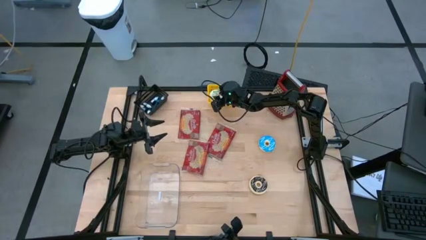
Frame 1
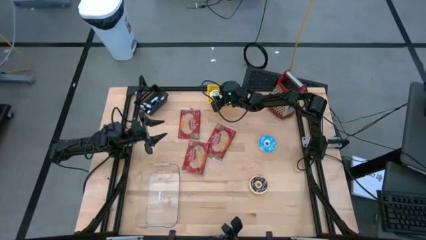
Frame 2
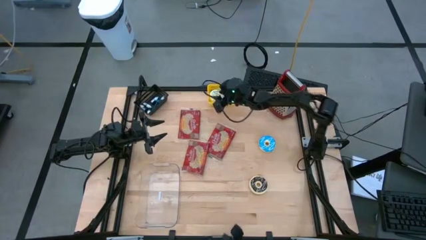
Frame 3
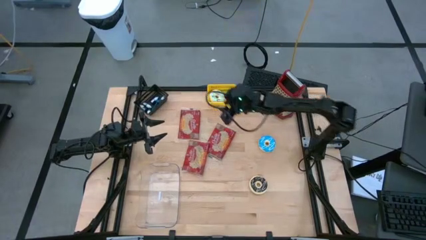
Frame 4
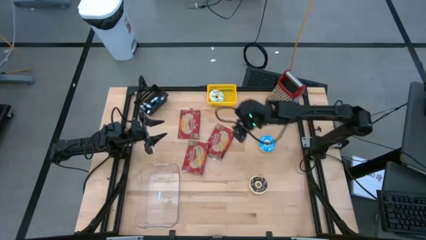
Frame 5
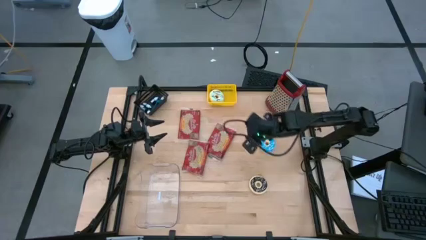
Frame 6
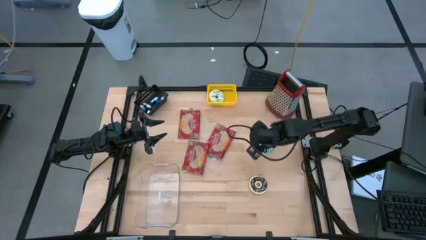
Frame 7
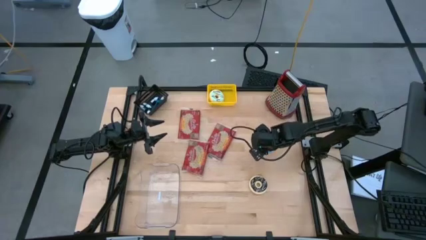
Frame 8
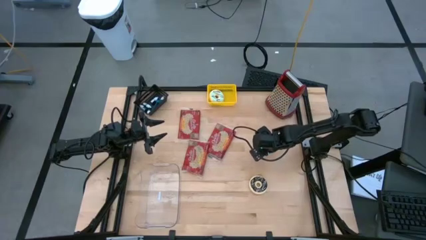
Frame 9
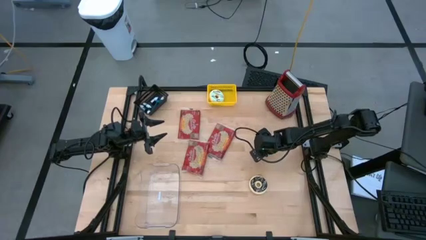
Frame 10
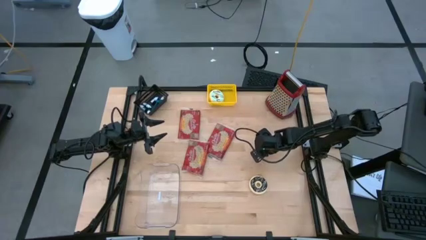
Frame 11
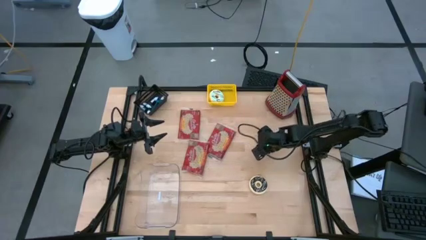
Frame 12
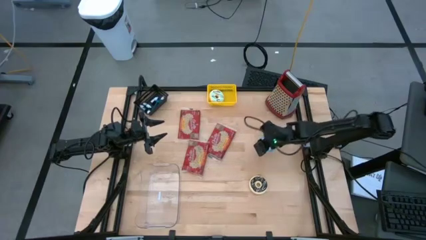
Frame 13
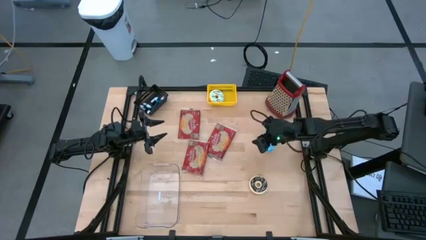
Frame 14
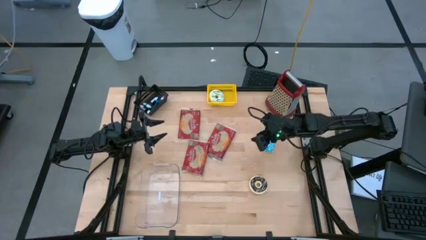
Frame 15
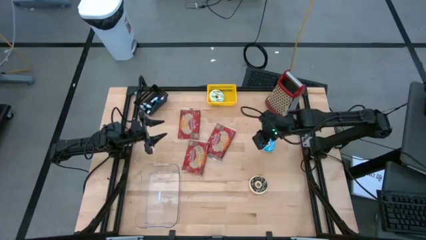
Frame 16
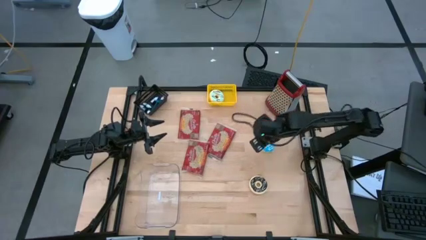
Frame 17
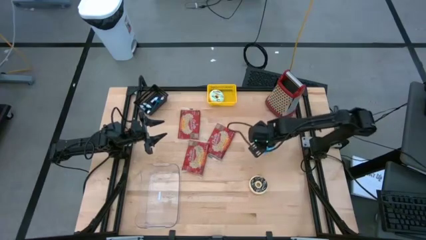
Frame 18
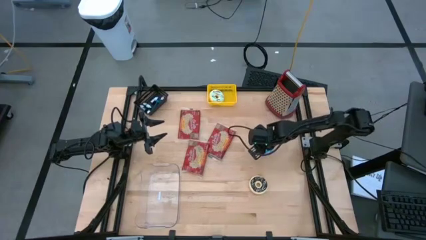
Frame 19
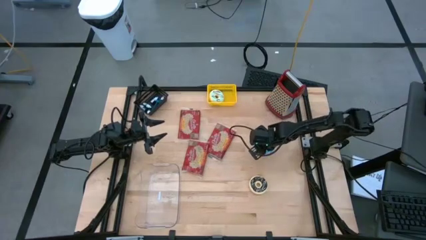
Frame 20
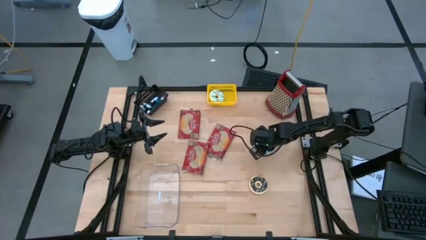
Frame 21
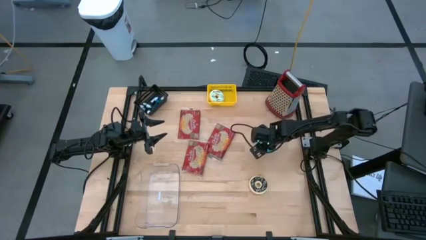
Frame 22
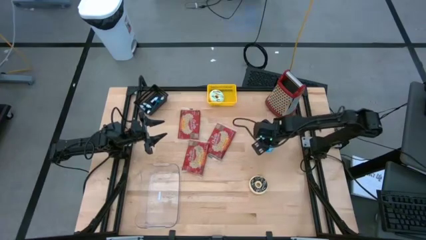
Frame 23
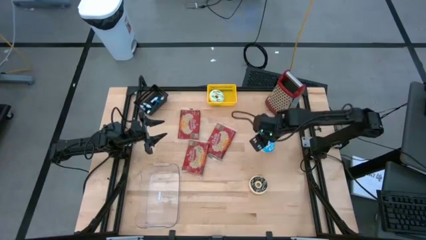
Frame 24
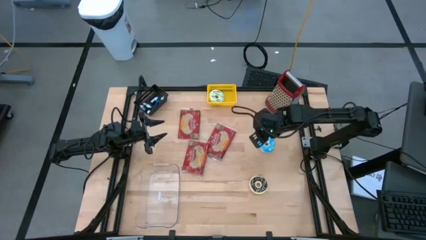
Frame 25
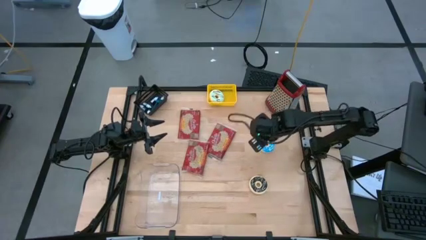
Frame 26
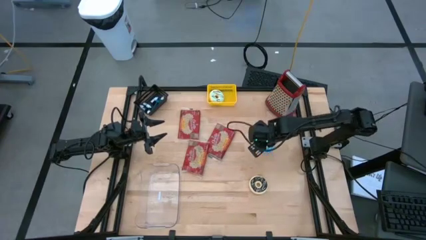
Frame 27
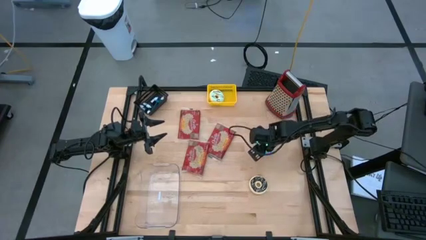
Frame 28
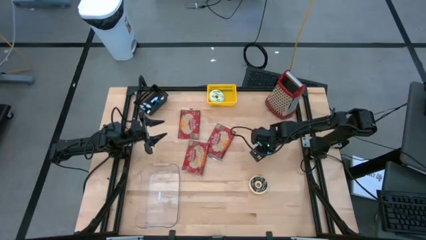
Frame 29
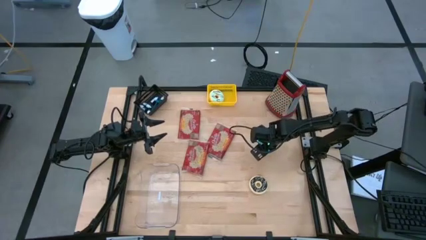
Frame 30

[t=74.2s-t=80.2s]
Put the blue donut into the yellow bin

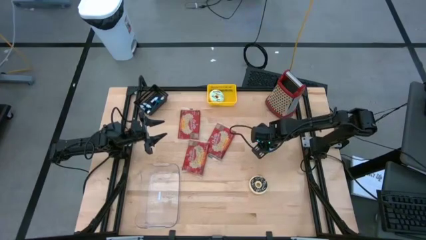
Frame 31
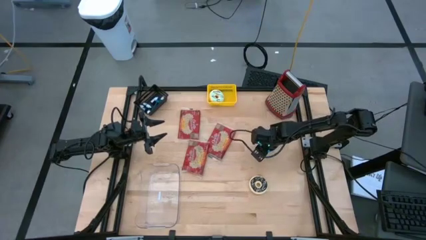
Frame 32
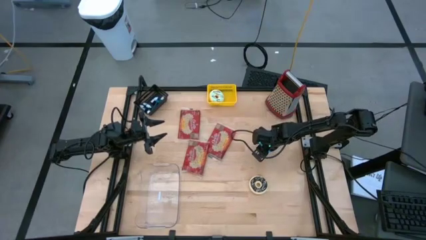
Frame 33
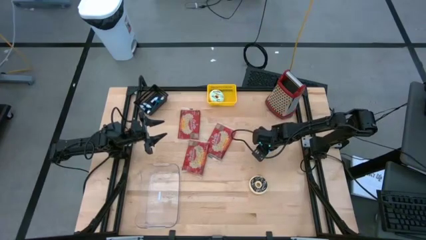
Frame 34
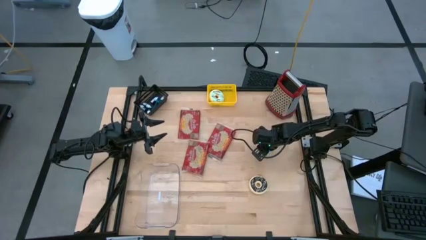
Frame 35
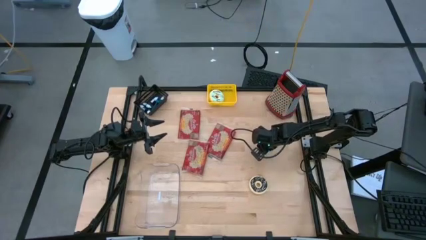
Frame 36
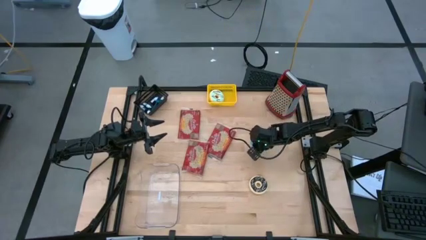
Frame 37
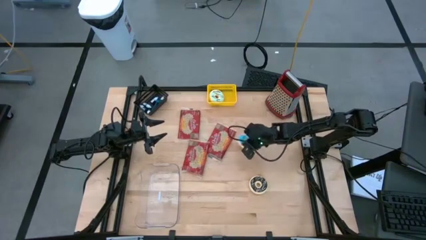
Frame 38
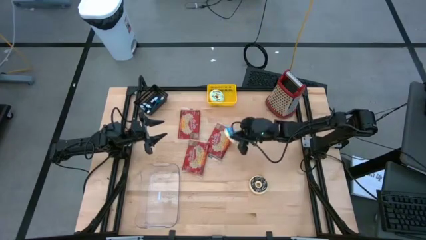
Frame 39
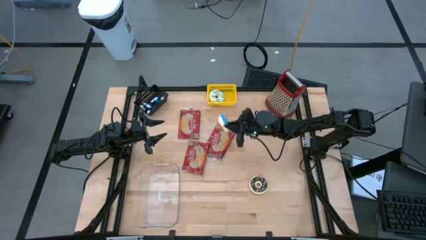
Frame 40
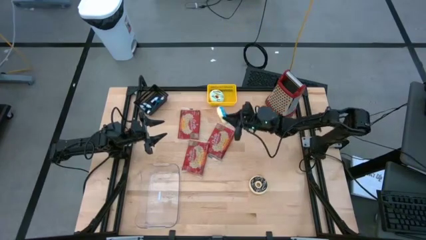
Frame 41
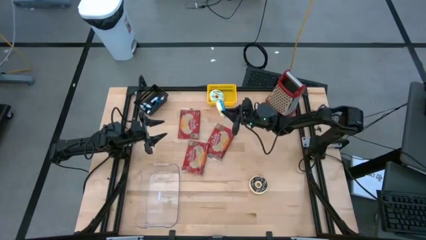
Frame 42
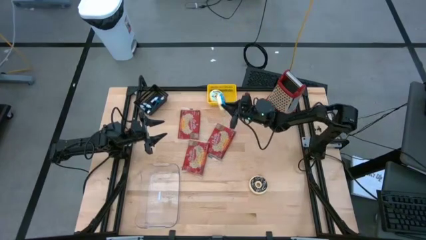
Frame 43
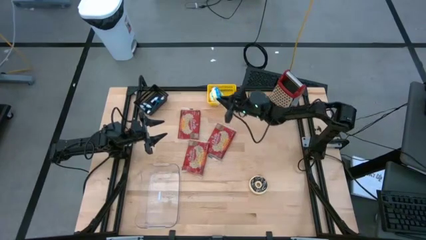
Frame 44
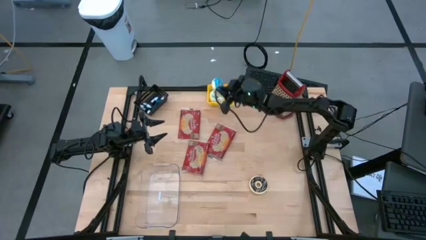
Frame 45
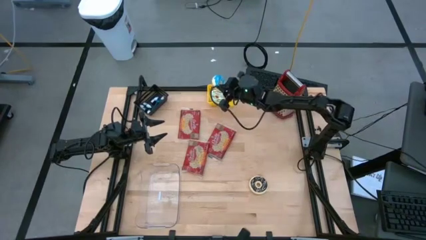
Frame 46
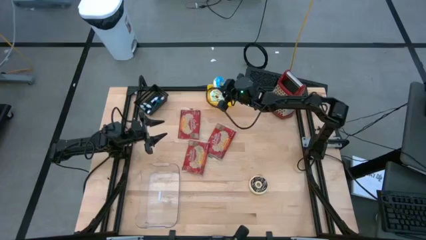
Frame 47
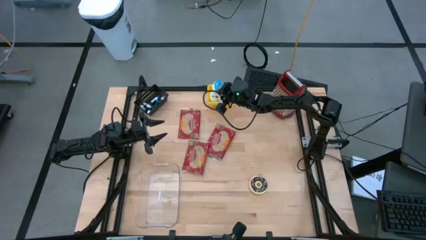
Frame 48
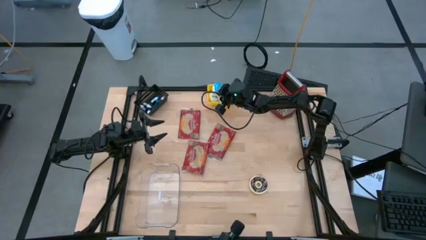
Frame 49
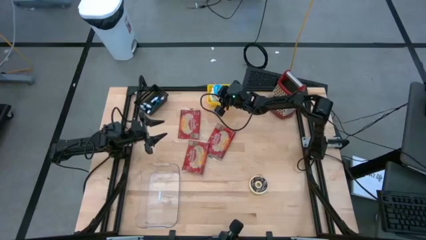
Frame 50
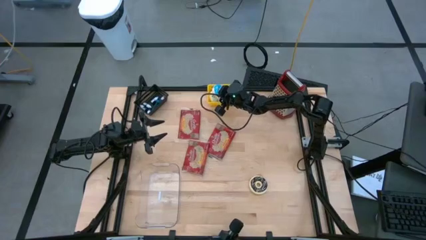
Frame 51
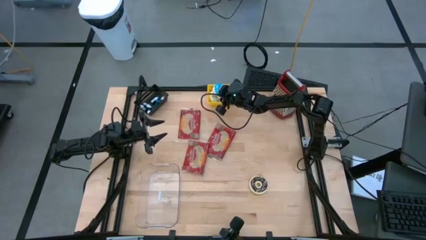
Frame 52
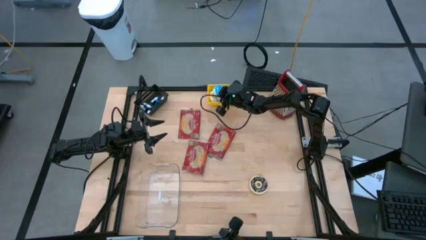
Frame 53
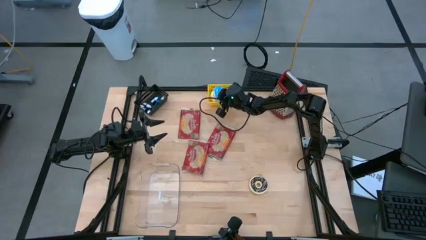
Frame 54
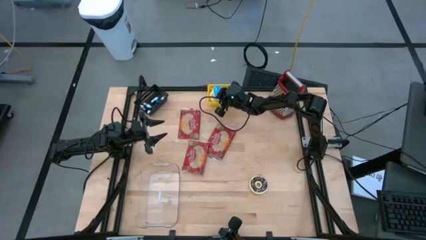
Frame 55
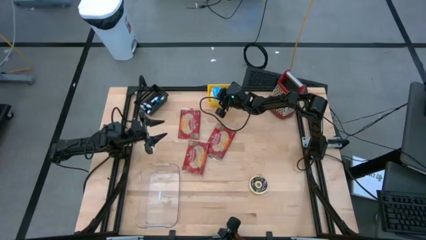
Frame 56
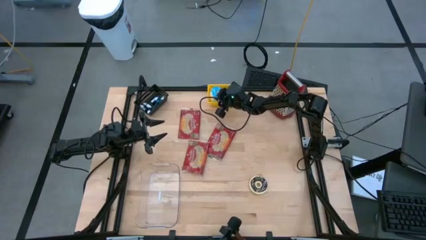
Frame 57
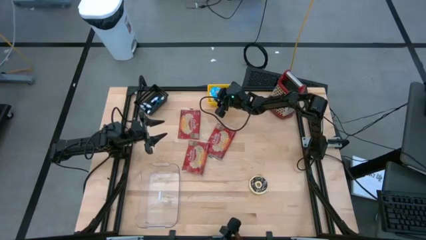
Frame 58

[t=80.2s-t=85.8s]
Put the blue donut into the yellow bin

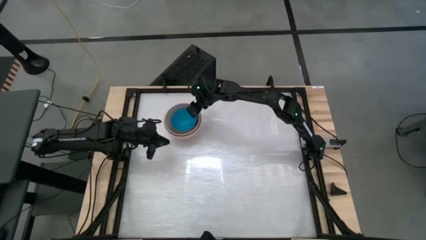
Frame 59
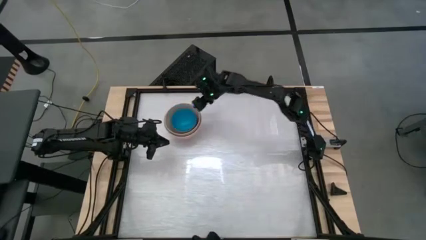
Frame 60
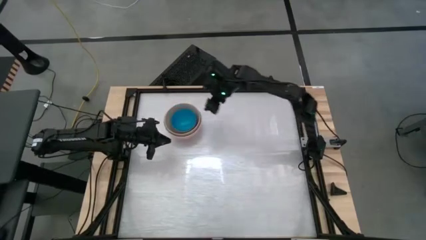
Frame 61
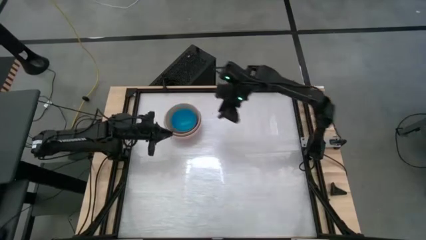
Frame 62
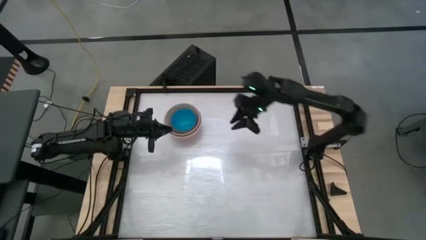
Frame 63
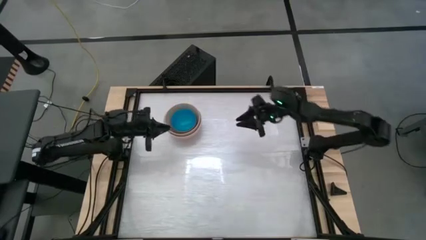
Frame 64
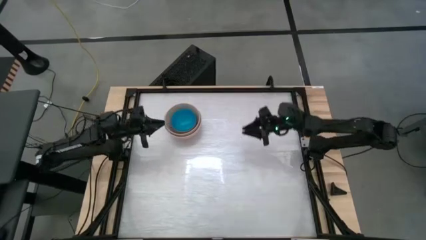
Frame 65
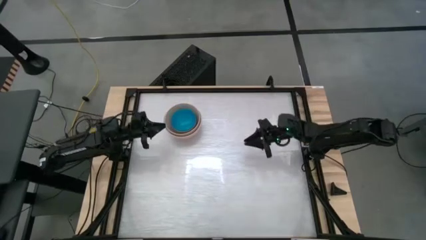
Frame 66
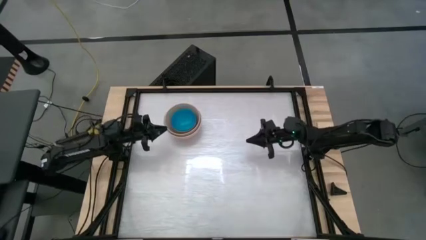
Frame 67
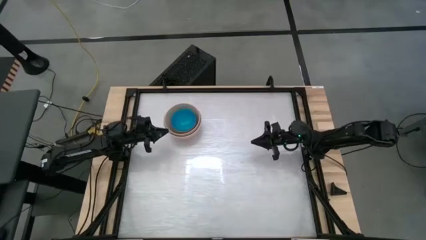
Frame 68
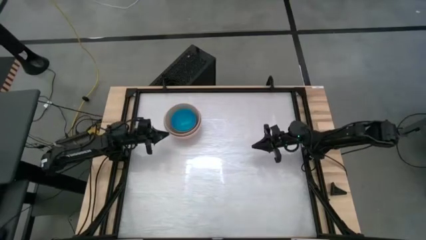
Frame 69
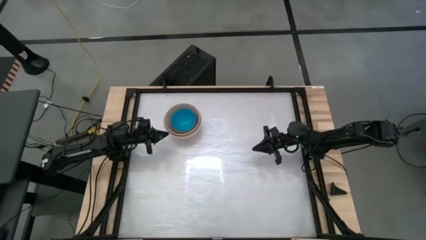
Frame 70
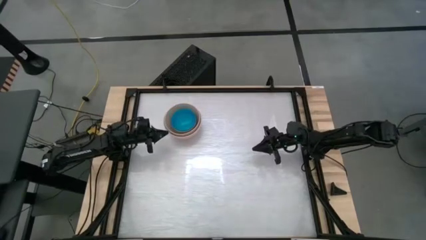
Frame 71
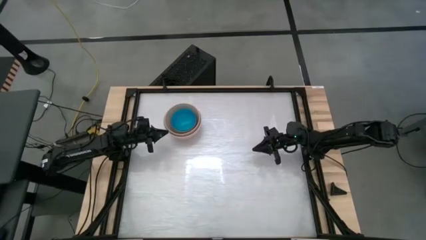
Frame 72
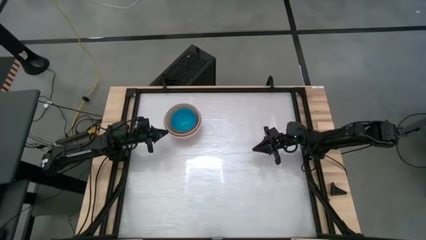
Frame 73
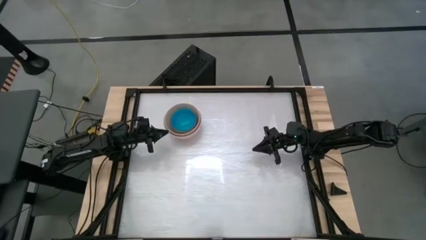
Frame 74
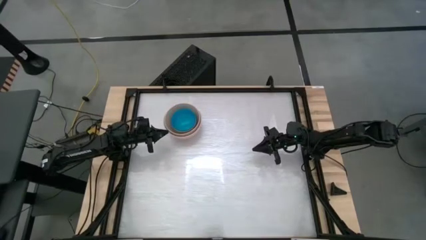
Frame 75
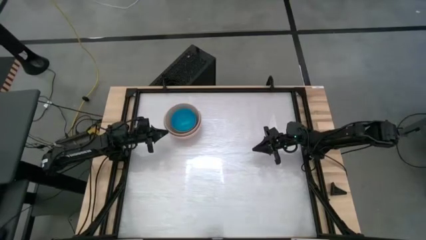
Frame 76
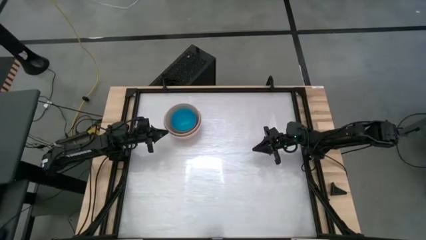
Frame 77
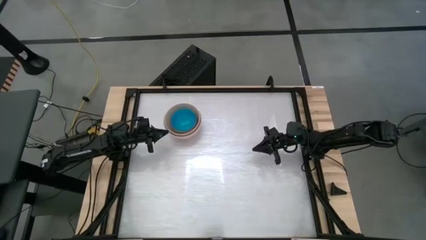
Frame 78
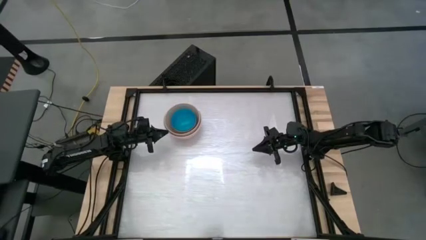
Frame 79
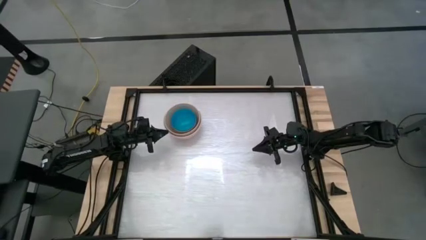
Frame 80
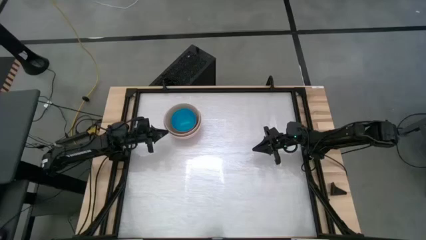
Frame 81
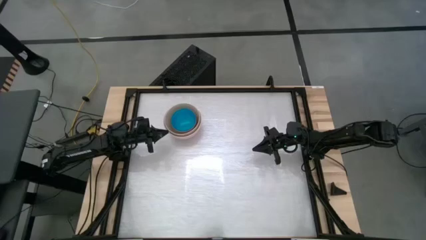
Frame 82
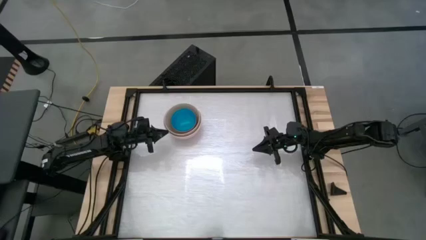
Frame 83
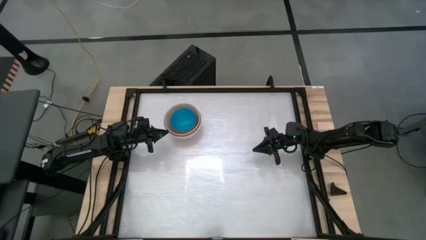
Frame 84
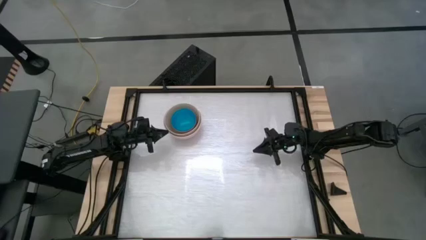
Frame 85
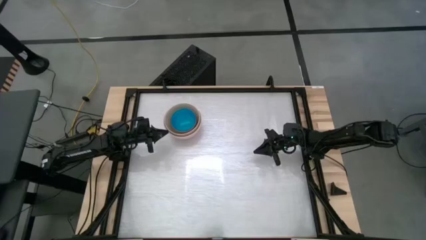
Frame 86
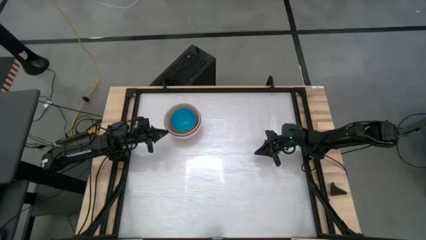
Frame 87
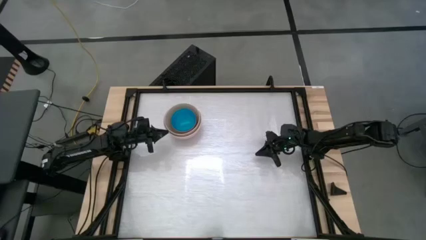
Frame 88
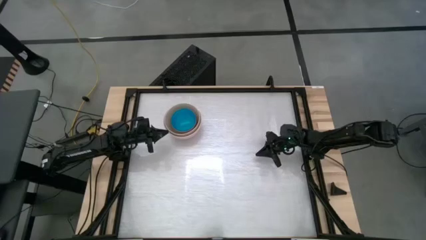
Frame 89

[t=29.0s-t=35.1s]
Return to Home Position
